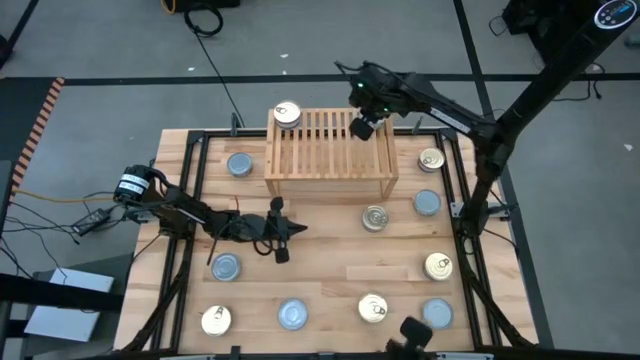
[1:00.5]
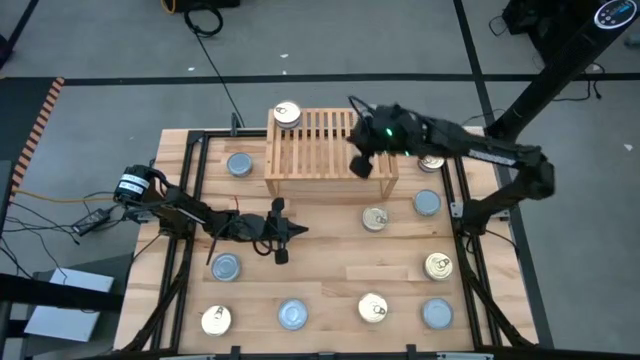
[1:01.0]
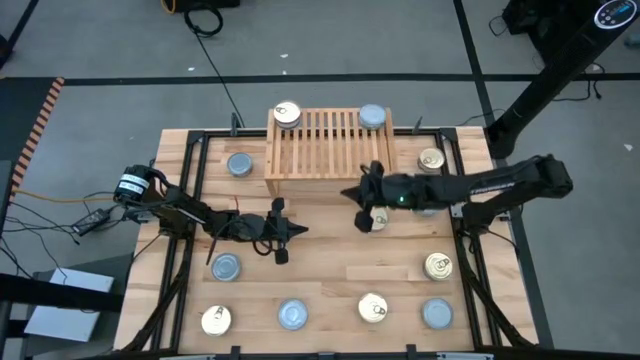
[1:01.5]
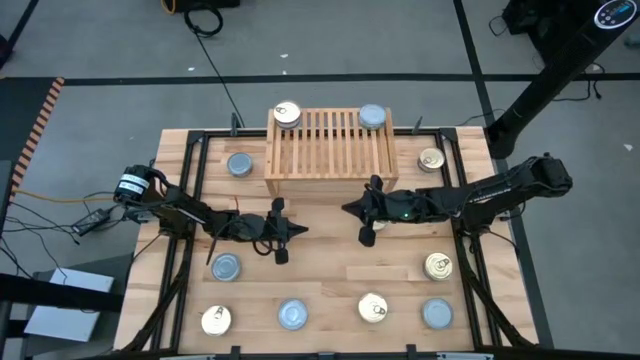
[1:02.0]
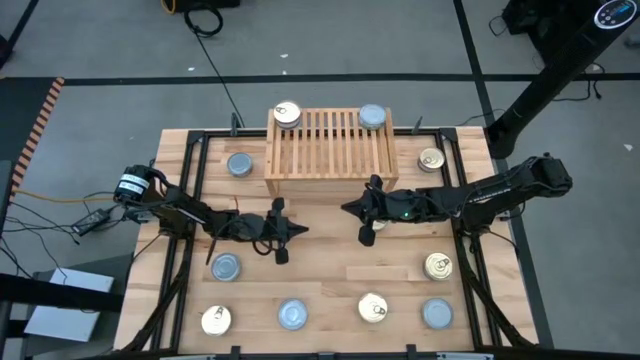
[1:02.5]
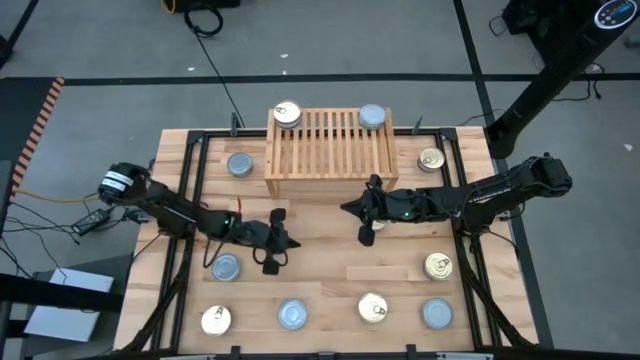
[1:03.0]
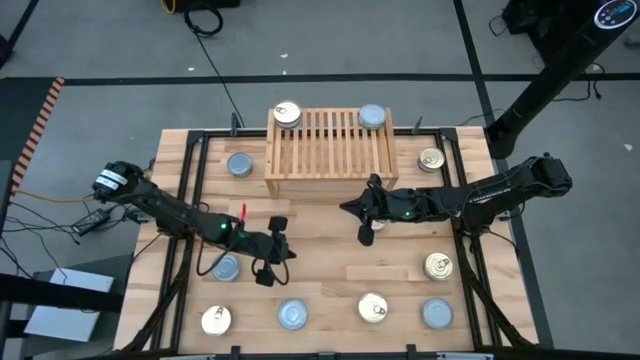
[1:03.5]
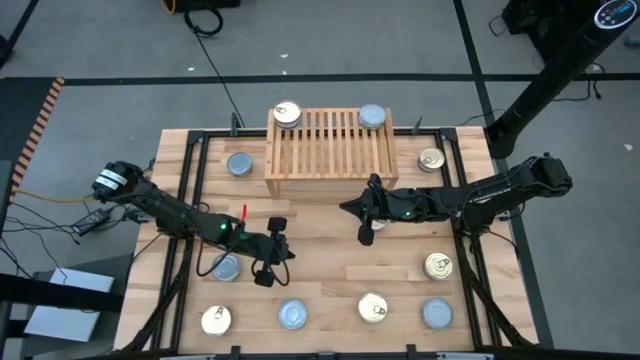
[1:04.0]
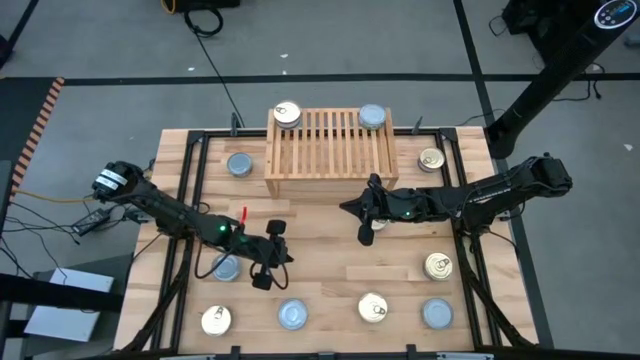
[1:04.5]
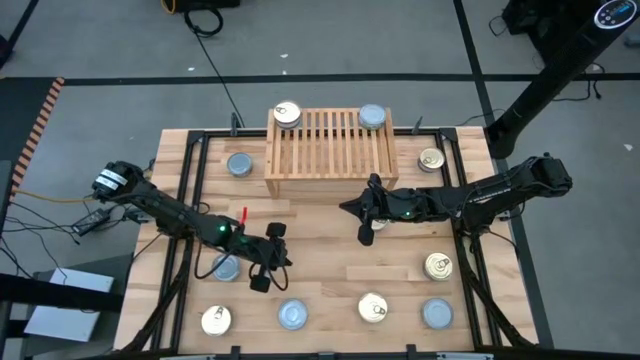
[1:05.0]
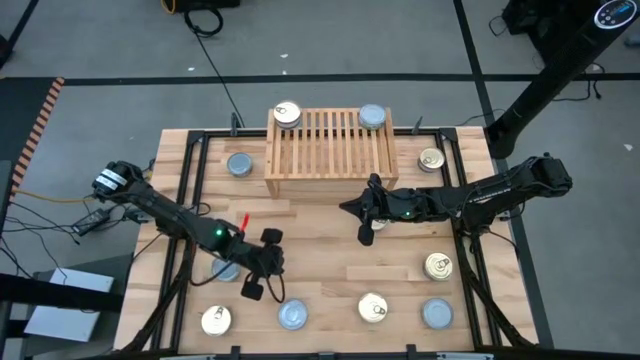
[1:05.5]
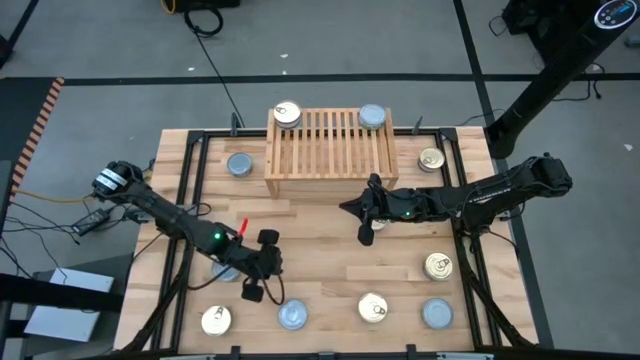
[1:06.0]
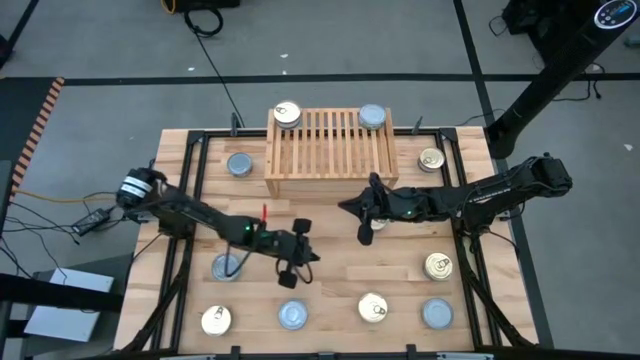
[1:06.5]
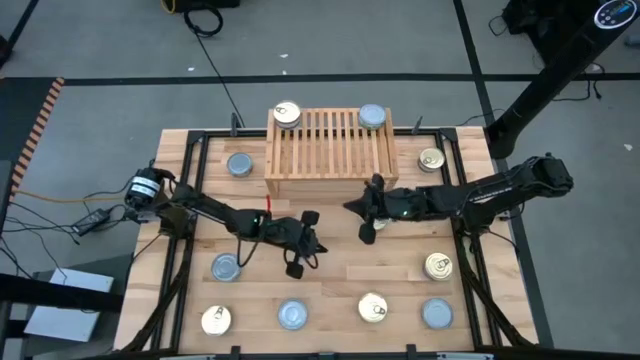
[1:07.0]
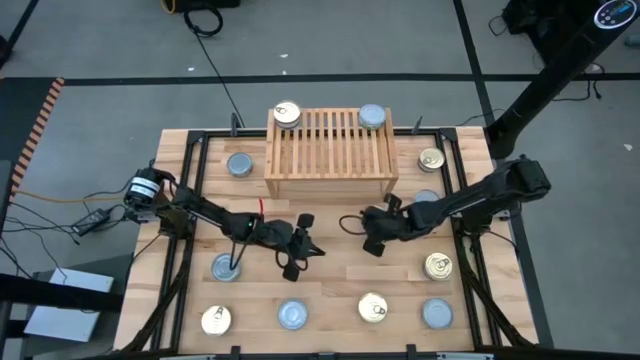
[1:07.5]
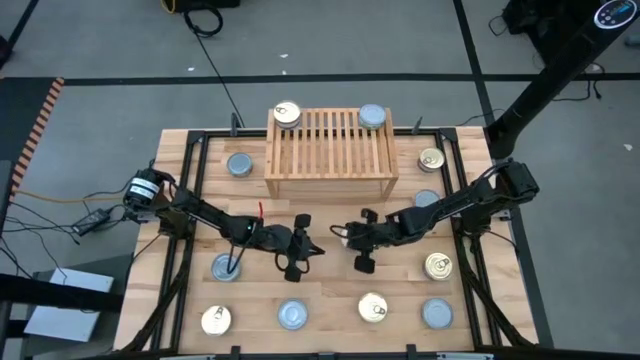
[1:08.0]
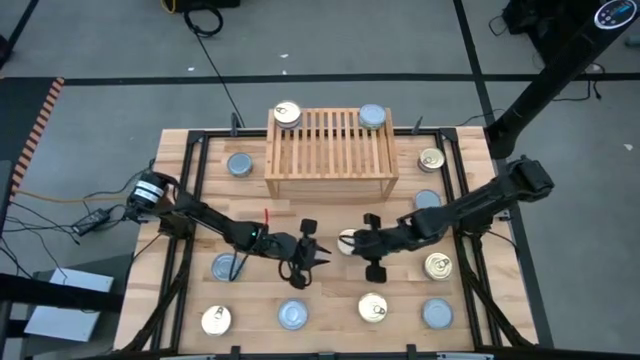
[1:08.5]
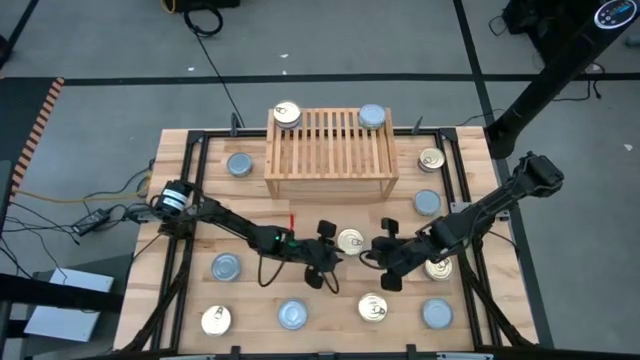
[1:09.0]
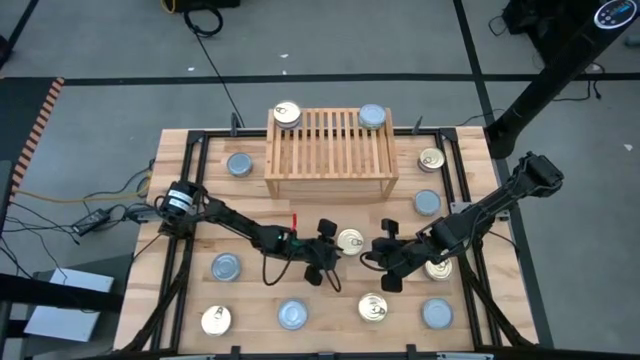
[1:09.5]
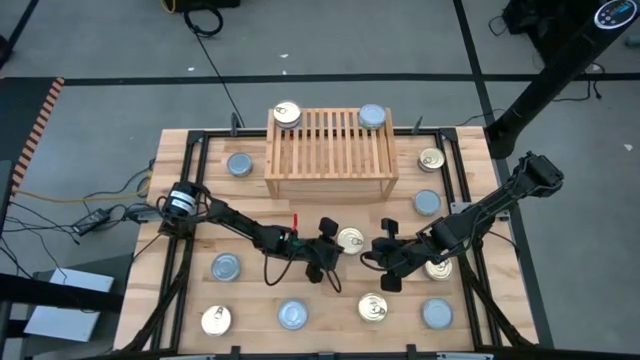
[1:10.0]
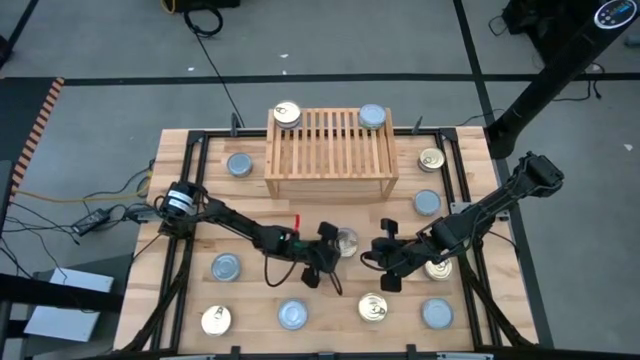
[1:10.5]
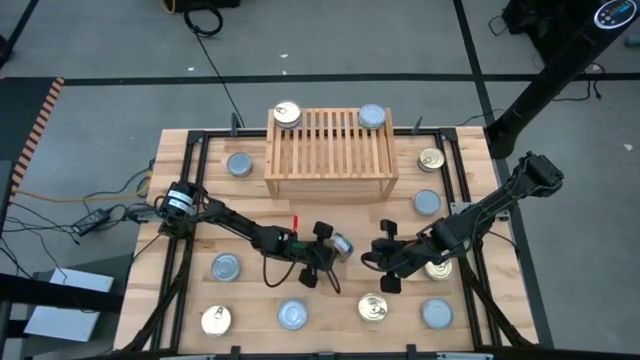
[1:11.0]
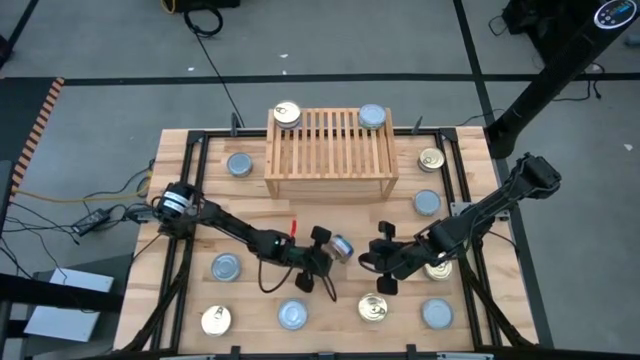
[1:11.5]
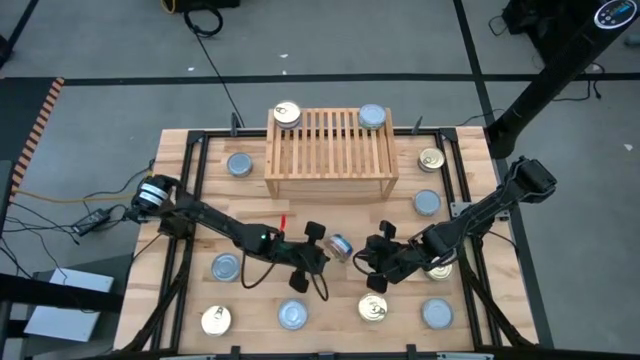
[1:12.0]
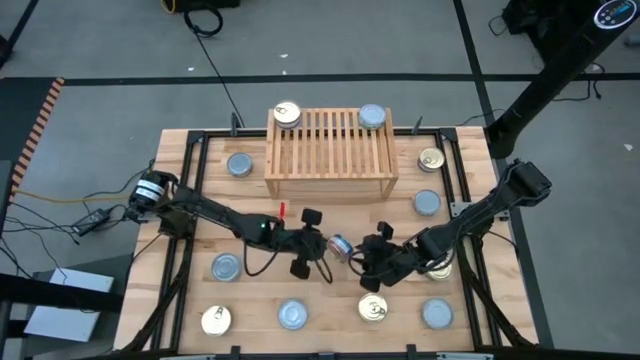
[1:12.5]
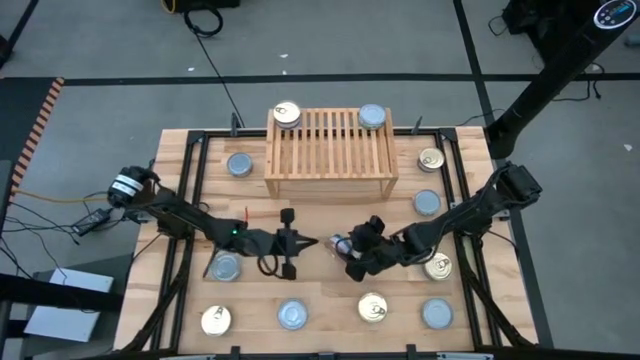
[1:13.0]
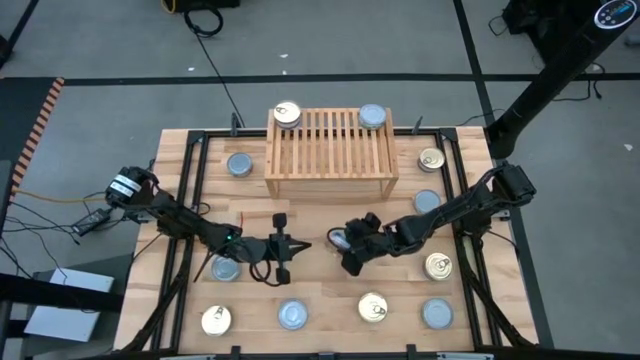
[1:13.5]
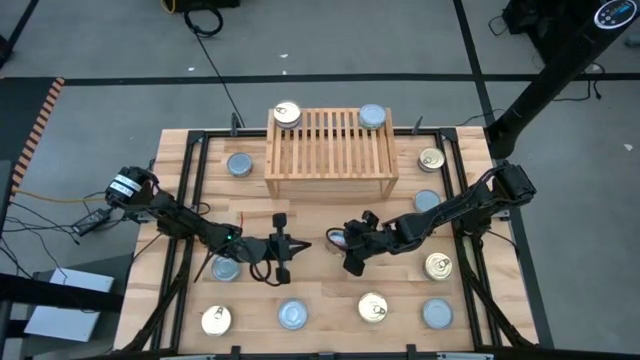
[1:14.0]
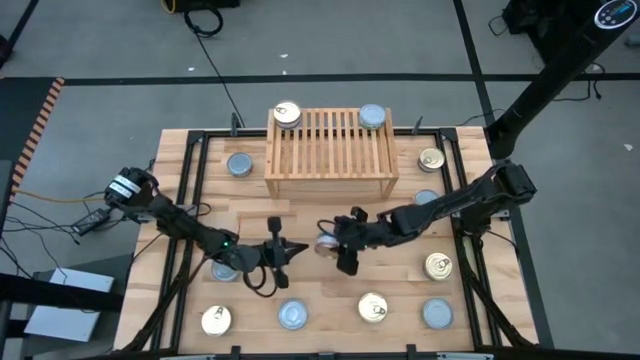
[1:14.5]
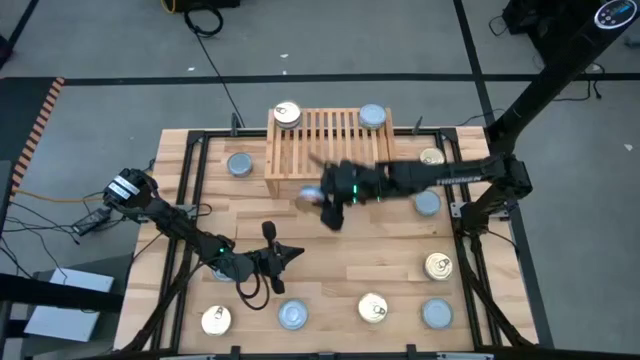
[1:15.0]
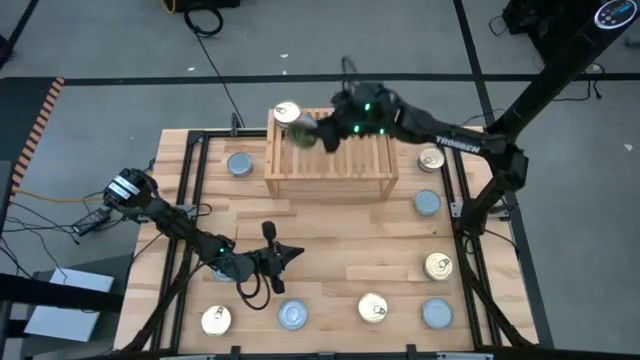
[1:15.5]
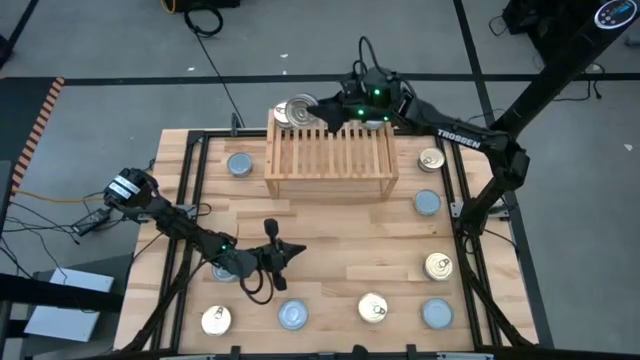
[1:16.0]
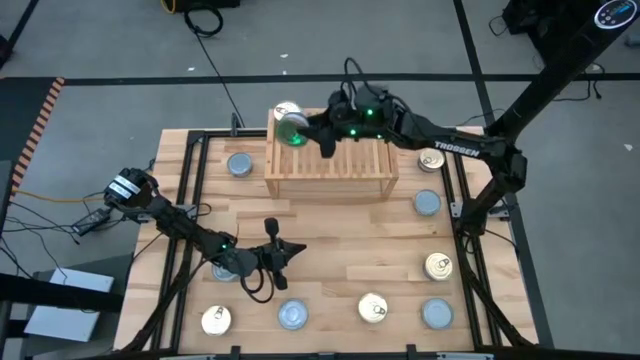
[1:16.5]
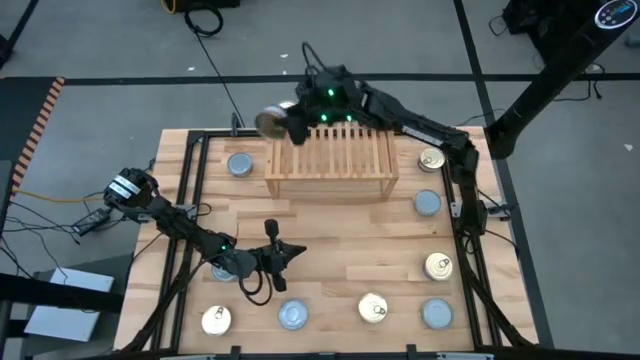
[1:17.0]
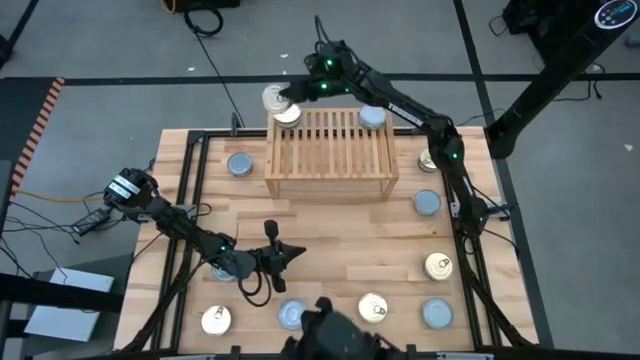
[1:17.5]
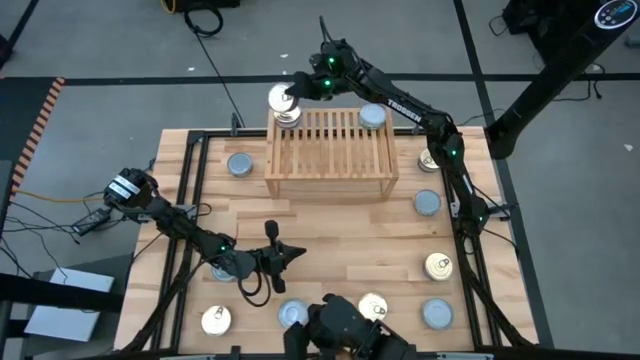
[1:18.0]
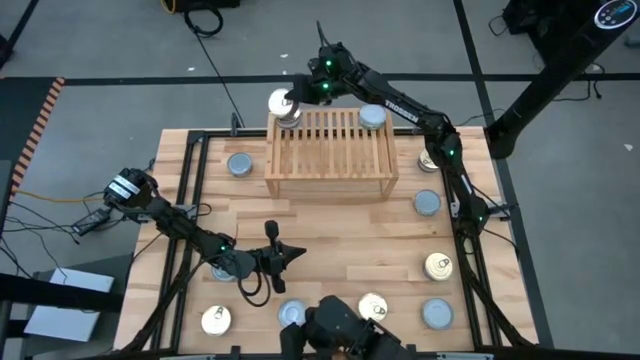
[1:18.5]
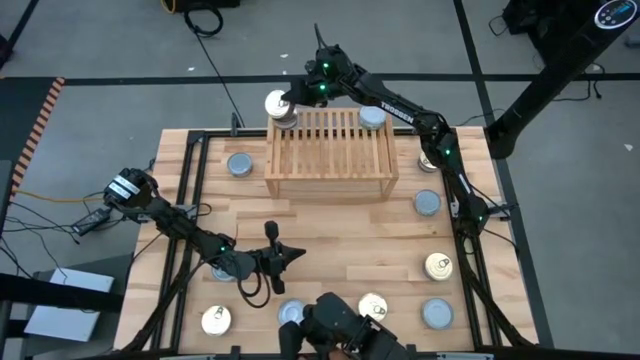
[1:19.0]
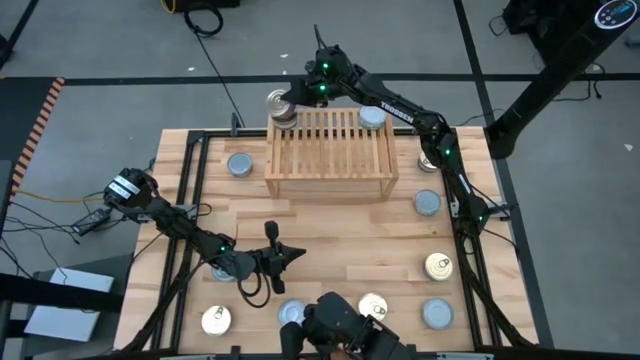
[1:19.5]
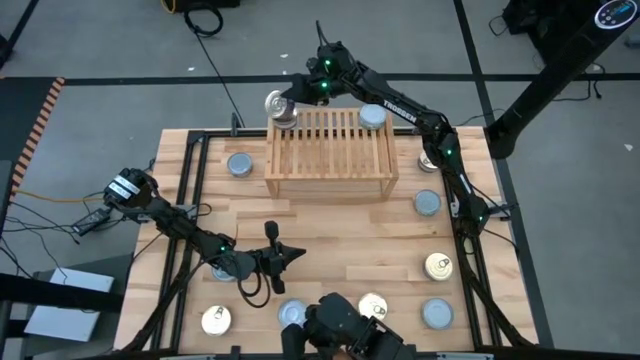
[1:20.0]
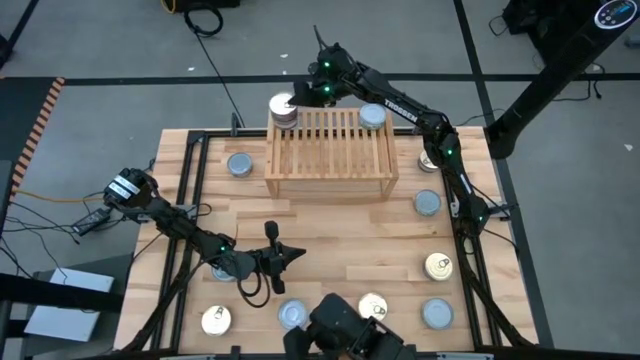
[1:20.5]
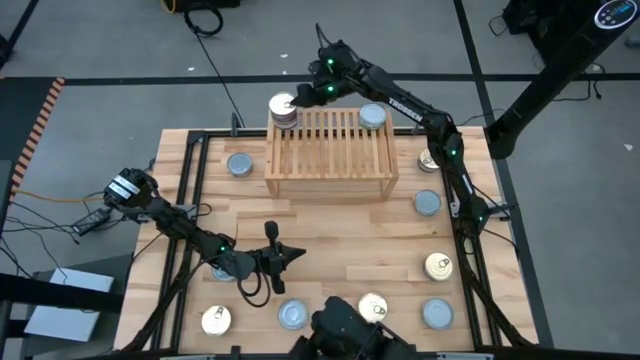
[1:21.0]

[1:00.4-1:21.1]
Task: Stack canned seafood by type on shelf
Stack the blue pink tuna can on top of the blue pink tuna can on the shelf
